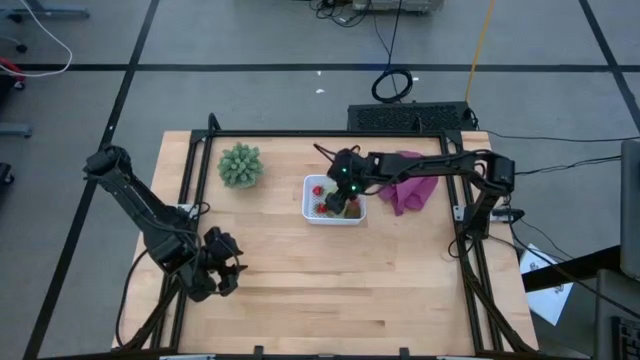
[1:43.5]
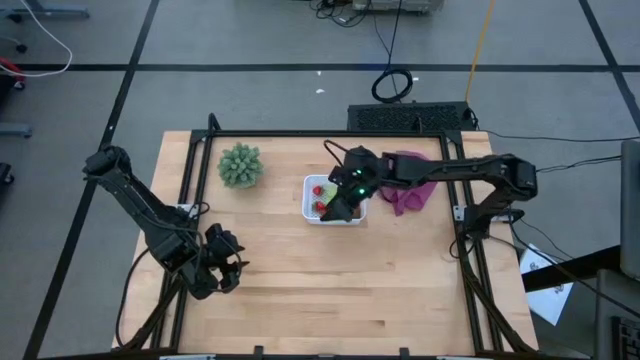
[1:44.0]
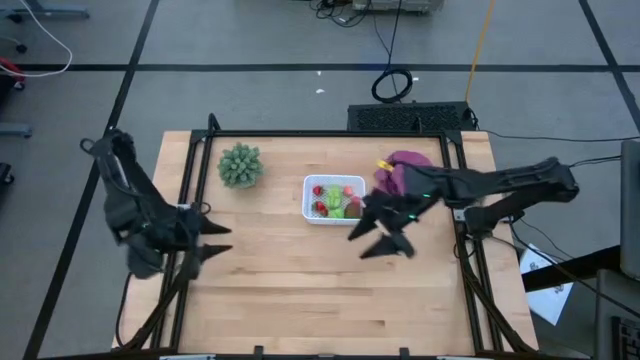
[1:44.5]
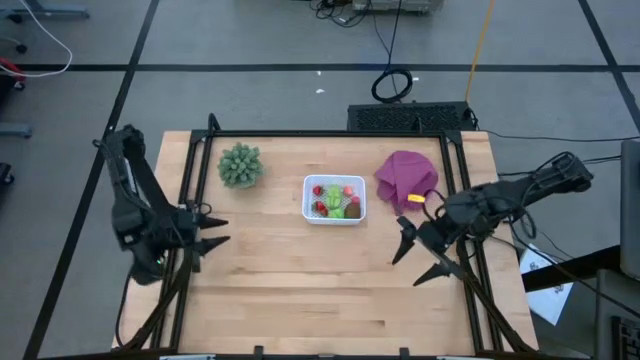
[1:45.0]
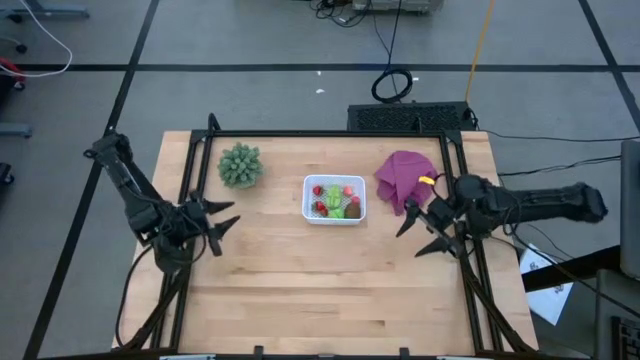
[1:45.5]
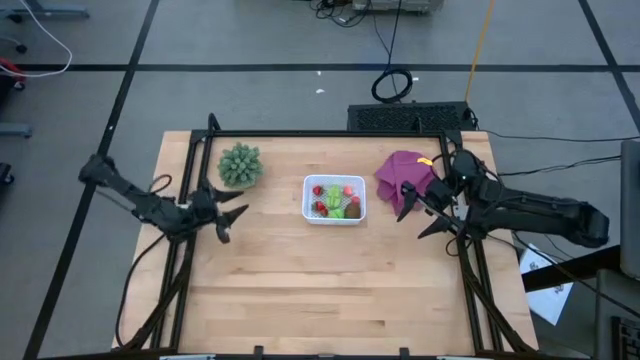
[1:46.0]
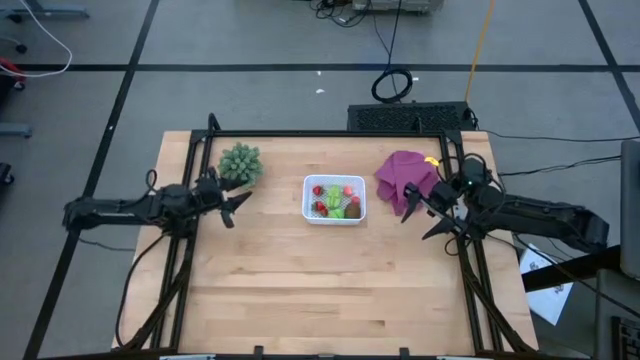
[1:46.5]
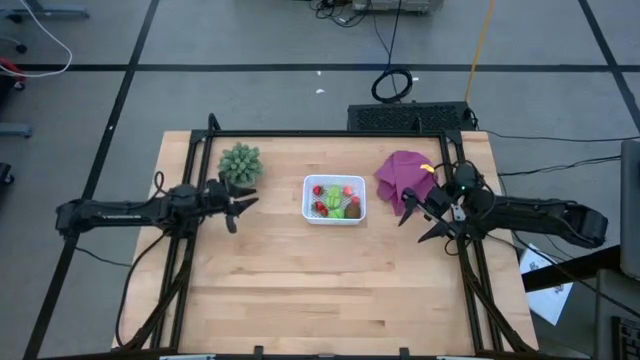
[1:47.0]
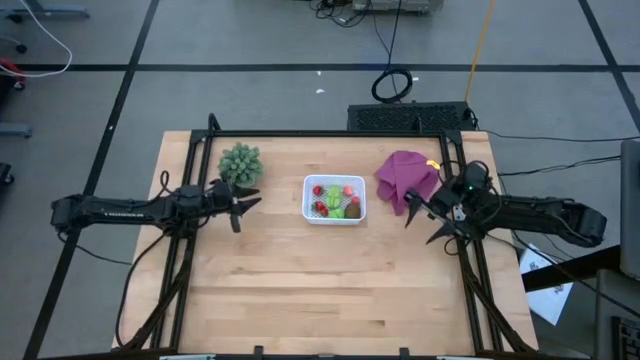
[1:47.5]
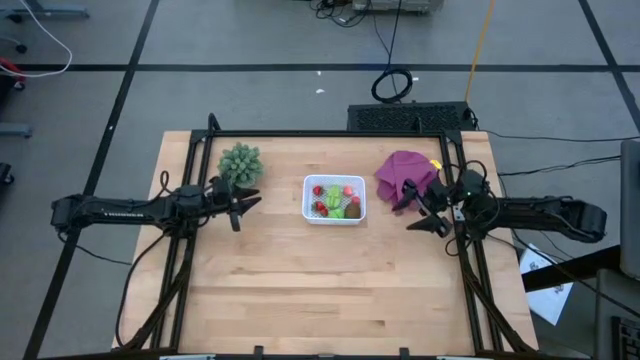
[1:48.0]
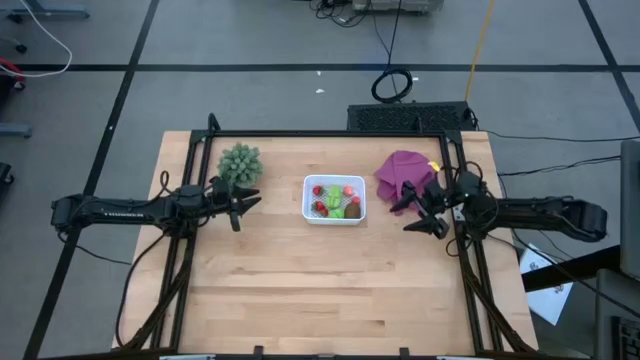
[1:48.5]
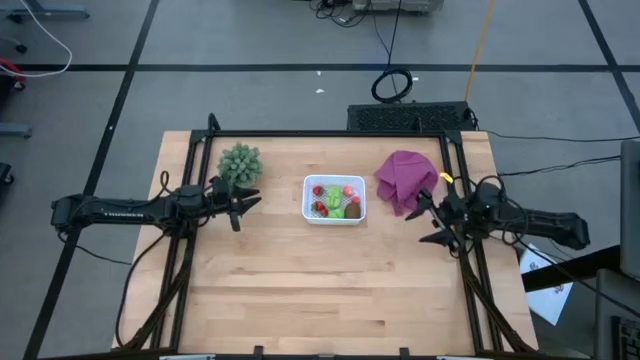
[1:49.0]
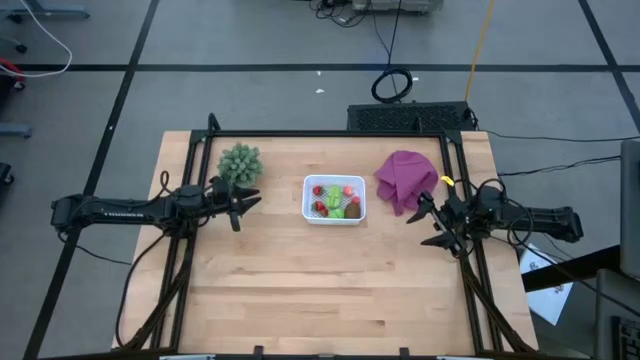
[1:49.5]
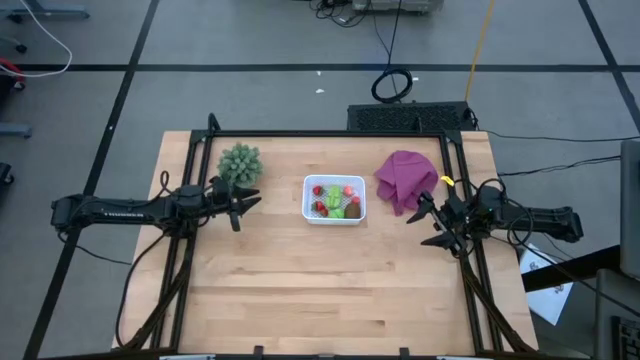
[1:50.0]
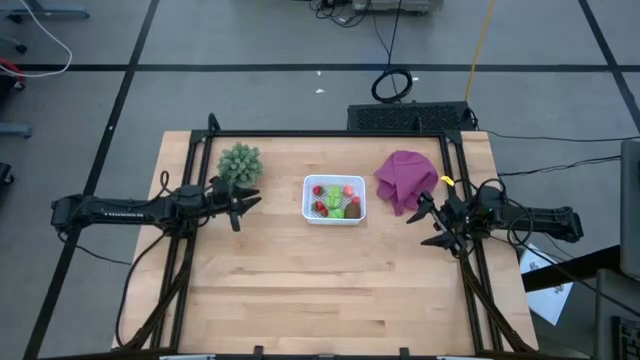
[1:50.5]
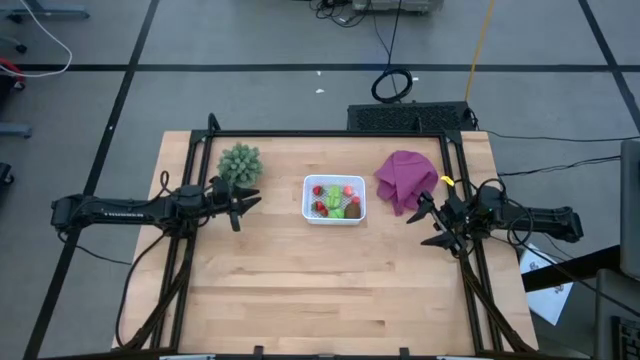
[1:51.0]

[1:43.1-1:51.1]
Task: Pick and placing Produce into tupperware
Return to Home Position

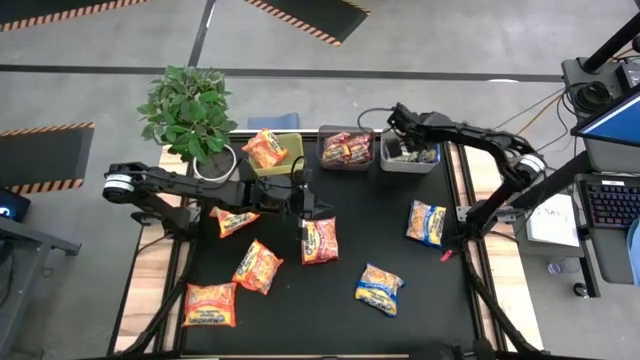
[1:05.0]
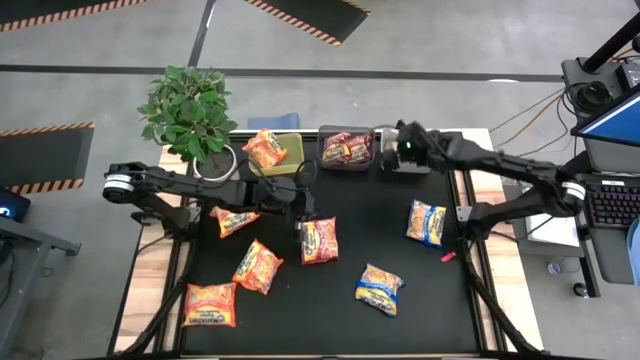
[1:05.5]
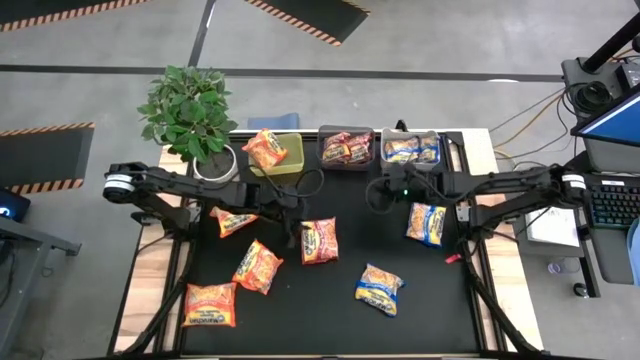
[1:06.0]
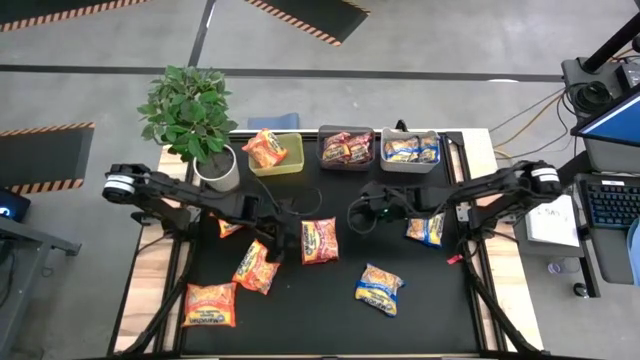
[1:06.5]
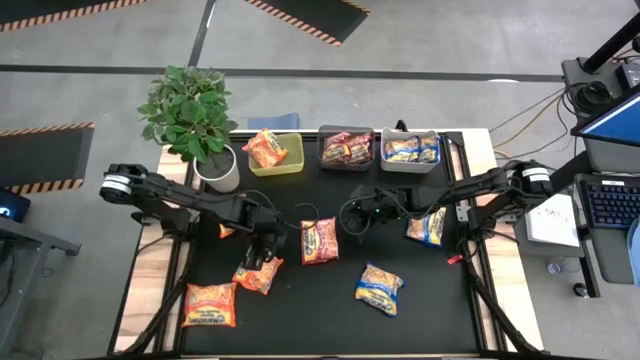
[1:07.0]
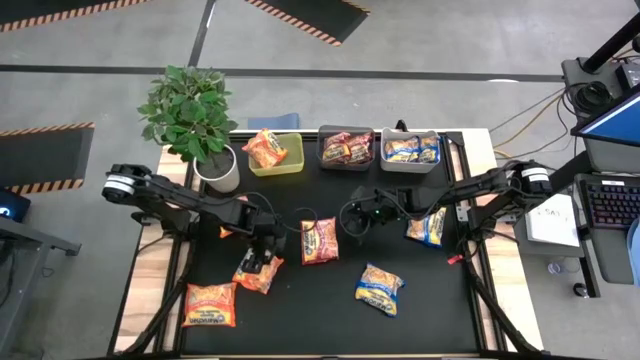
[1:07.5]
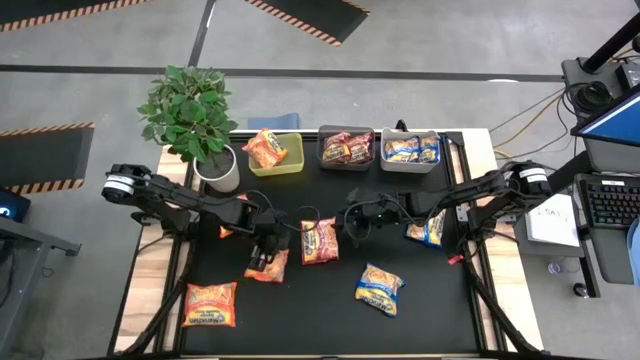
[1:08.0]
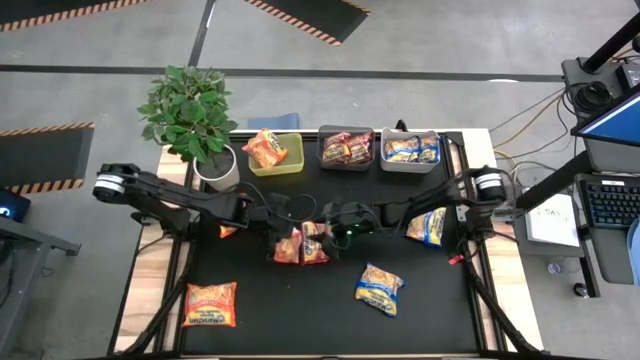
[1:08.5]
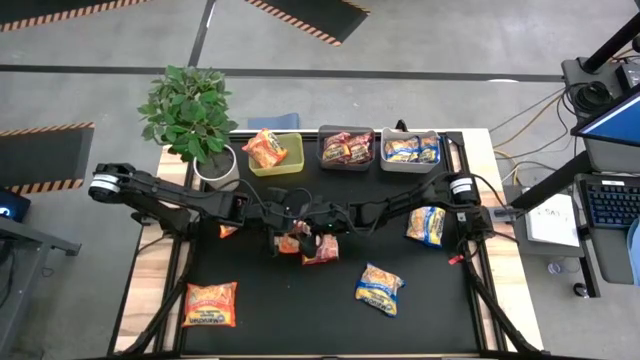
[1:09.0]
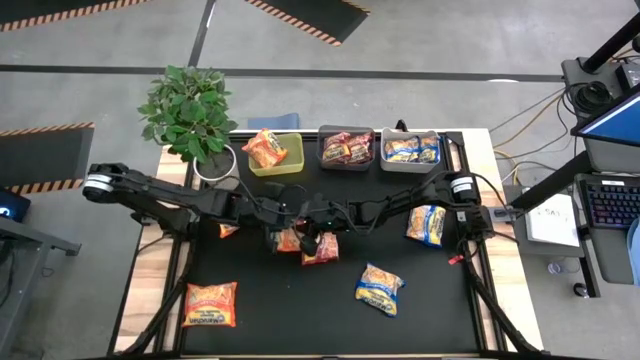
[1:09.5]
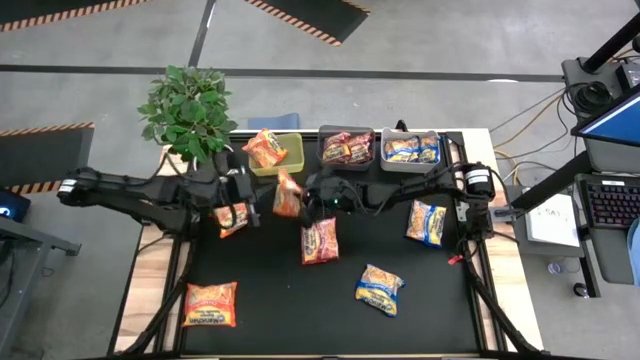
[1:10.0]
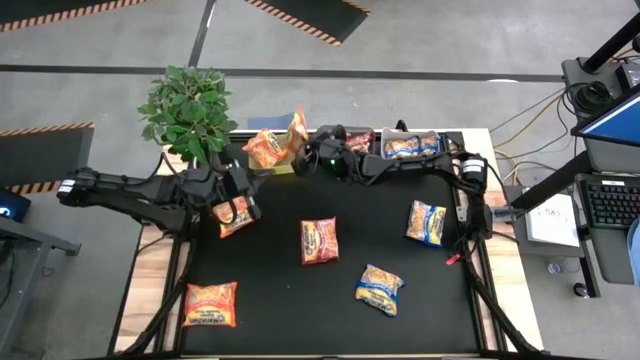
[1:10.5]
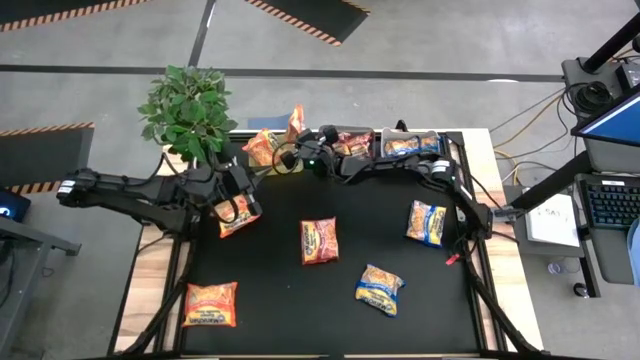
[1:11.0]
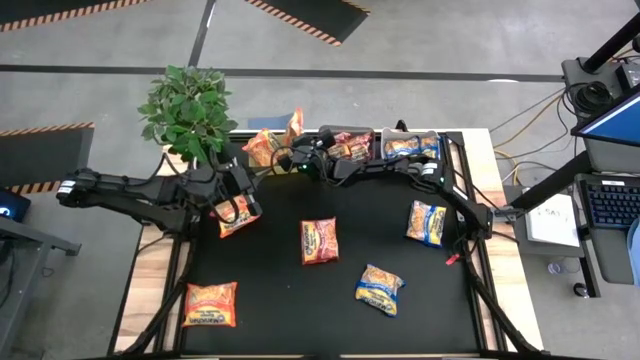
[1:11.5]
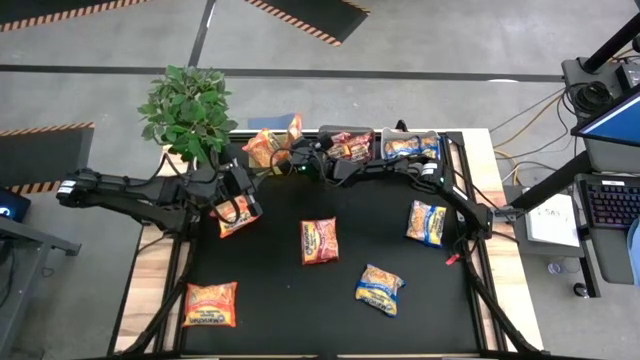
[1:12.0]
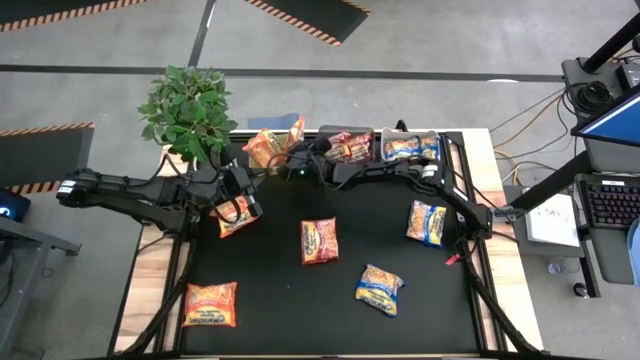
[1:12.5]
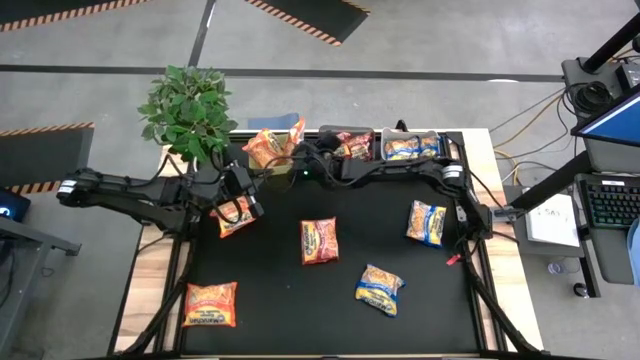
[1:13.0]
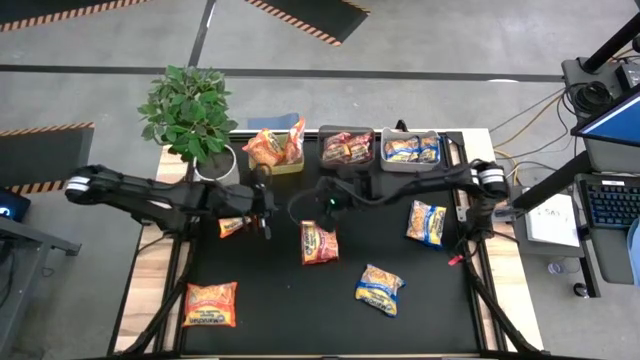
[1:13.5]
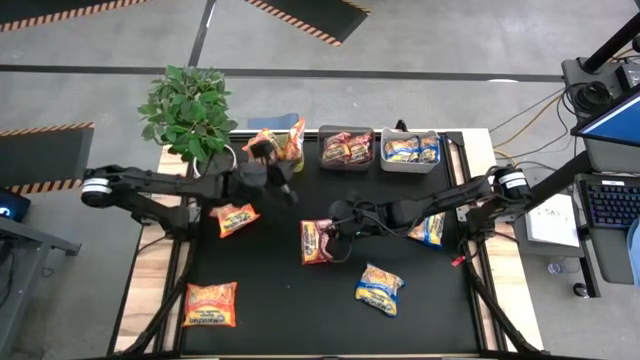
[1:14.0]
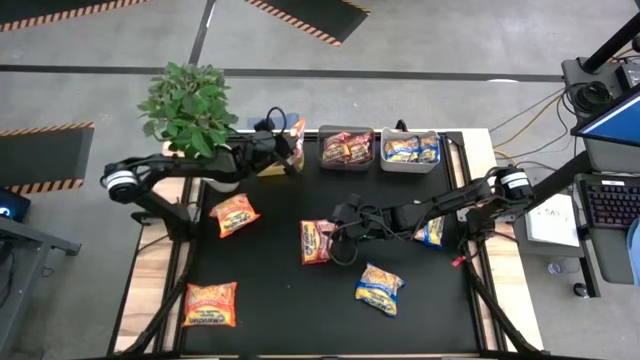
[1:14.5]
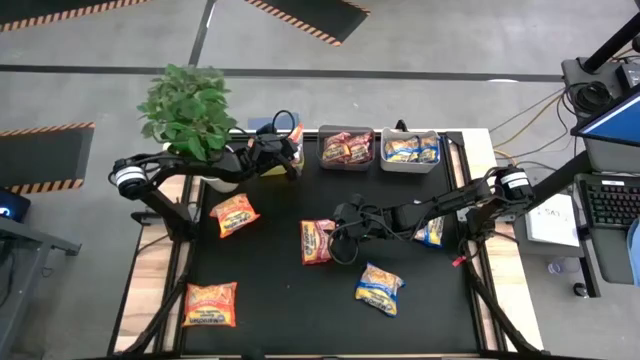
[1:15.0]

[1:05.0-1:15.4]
Task: Sort Maruchan noodles
Put the middle orange noodle pack into the yellow bin

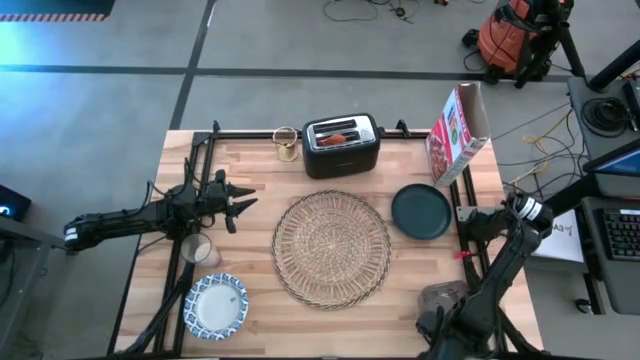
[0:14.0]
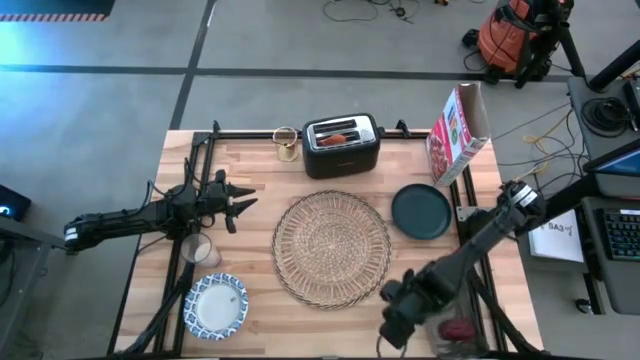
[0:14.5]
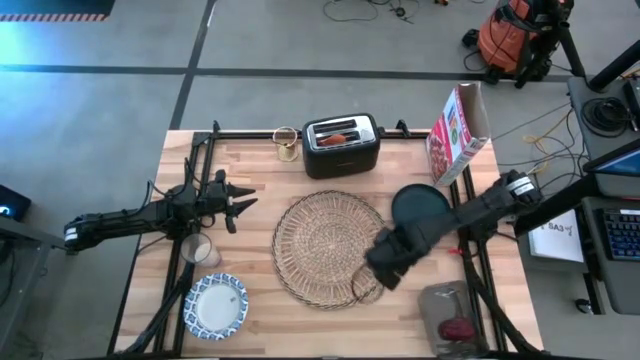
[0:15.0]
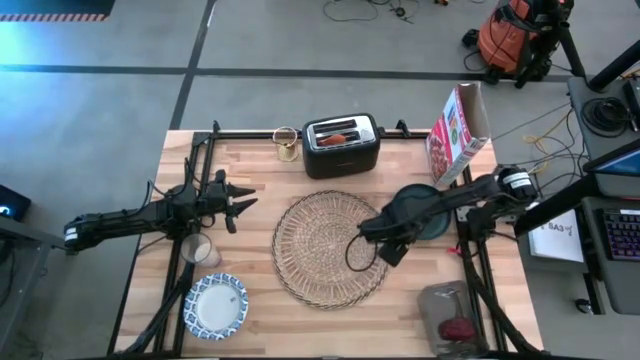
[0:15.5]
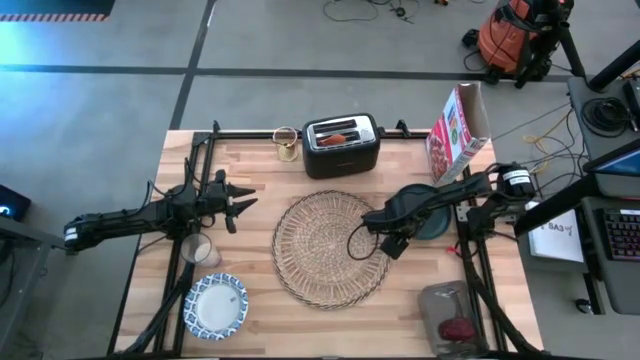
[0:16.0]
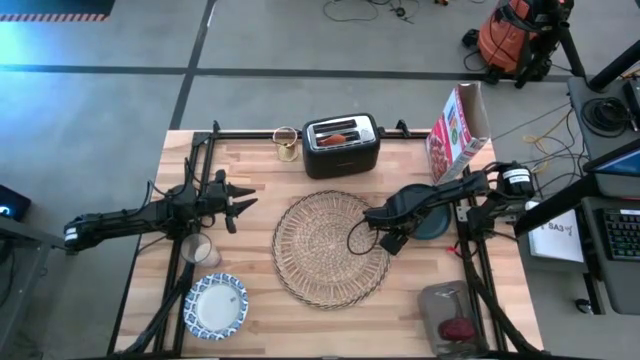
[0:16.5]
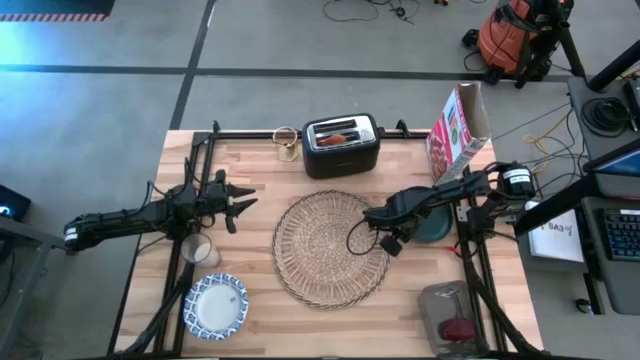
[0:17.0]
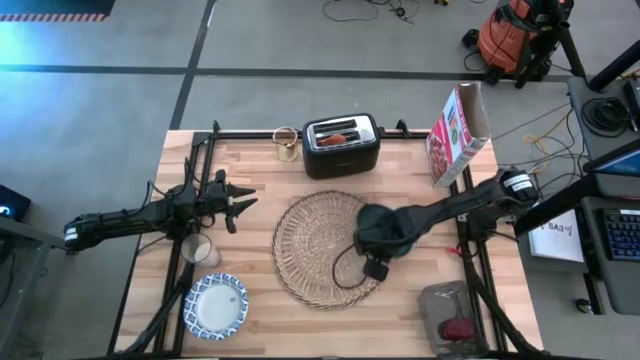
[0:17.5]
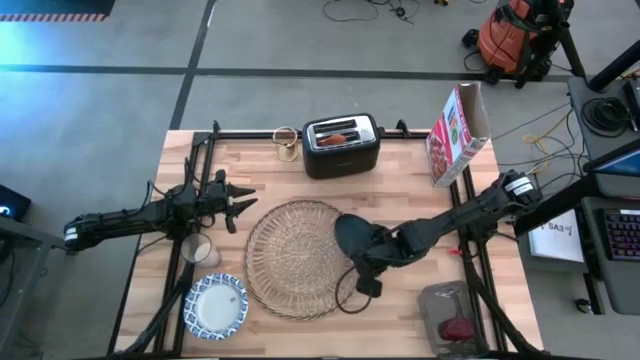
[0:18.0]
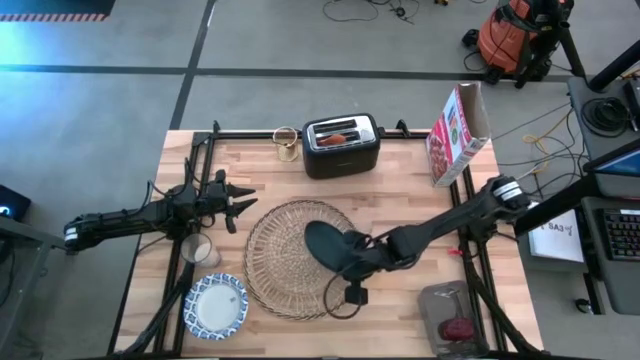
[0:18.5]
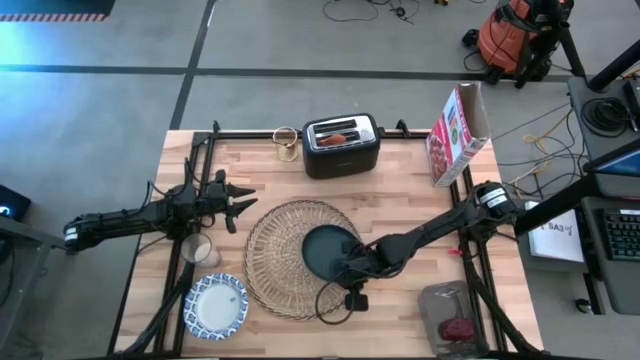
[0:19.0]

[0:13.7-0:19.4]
Task: Arrange a breakfast setting
Put the blue plate on the right side of the brown place mat
